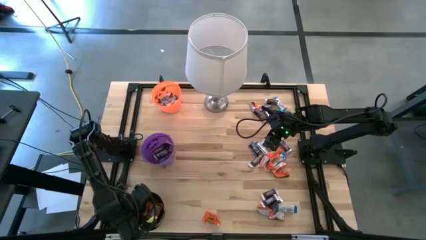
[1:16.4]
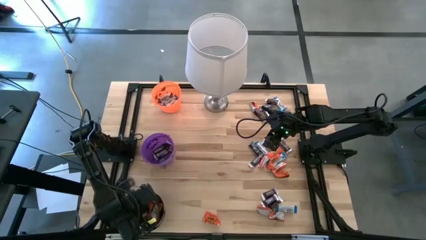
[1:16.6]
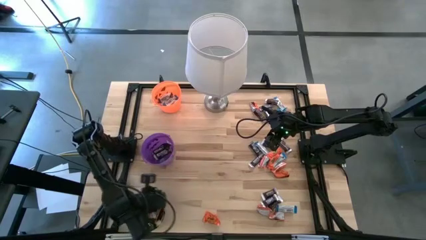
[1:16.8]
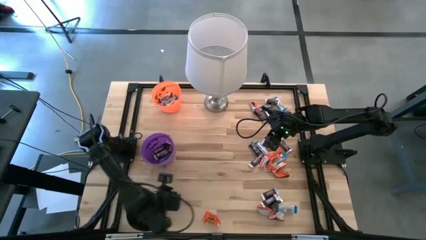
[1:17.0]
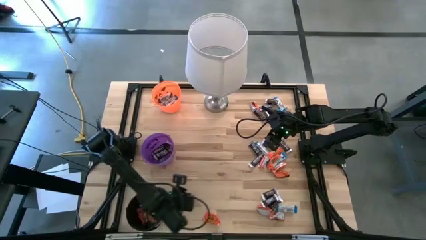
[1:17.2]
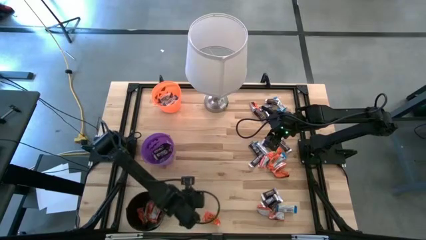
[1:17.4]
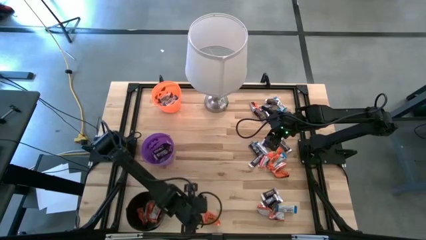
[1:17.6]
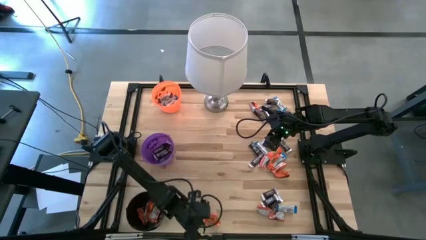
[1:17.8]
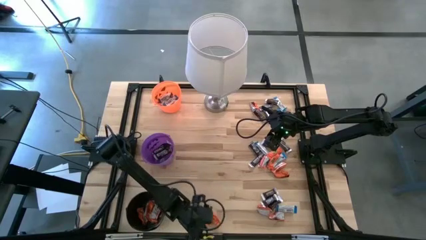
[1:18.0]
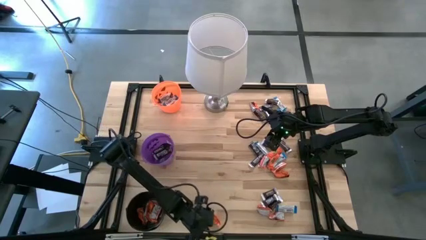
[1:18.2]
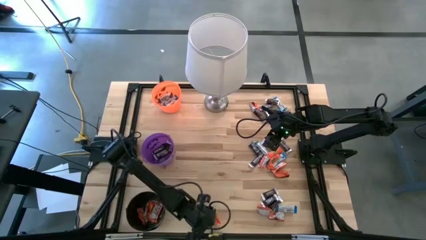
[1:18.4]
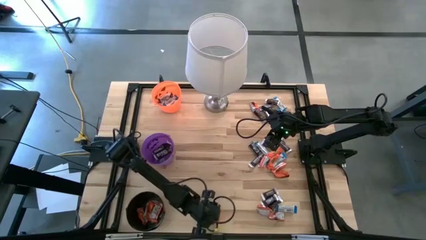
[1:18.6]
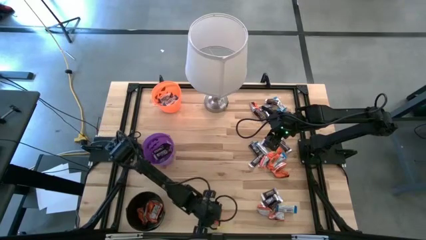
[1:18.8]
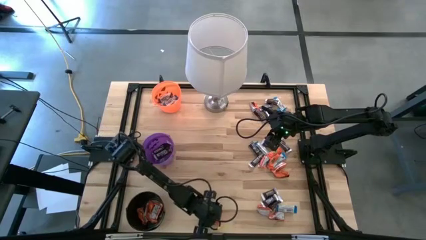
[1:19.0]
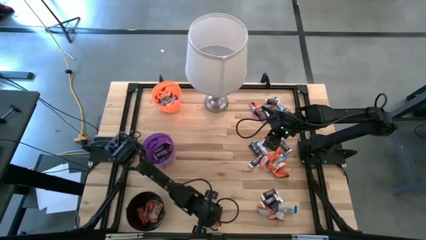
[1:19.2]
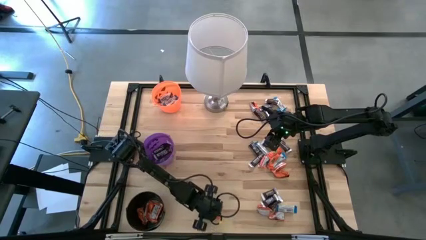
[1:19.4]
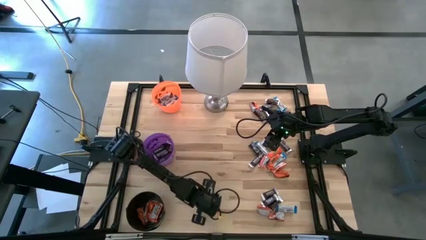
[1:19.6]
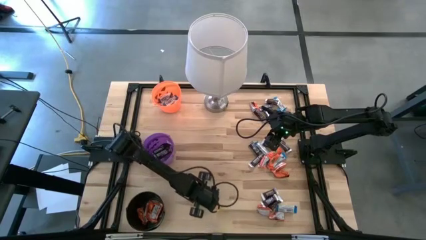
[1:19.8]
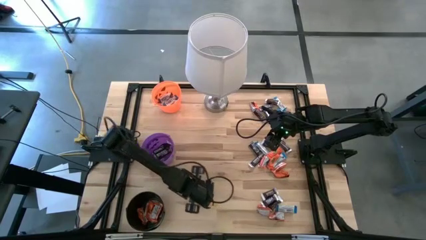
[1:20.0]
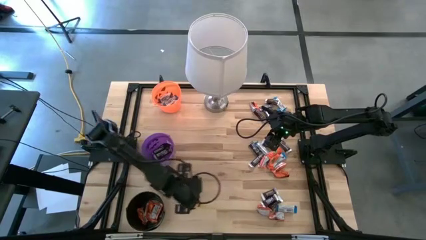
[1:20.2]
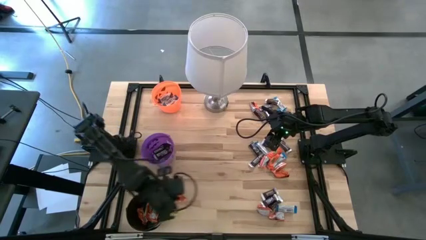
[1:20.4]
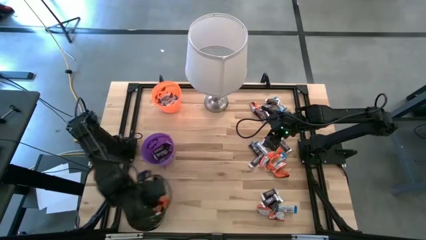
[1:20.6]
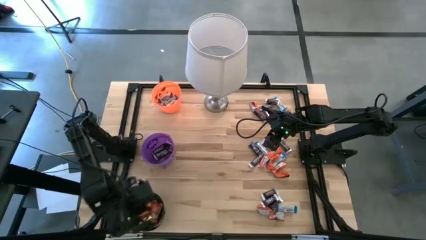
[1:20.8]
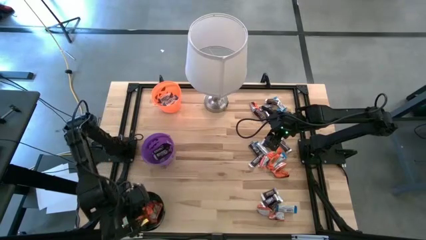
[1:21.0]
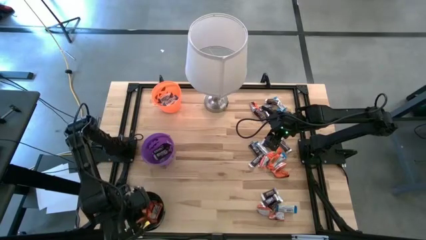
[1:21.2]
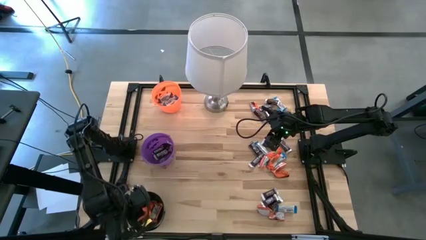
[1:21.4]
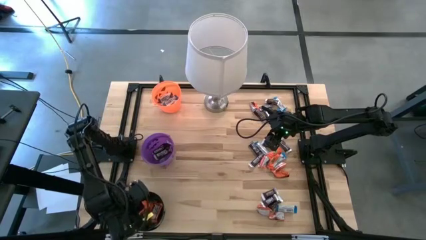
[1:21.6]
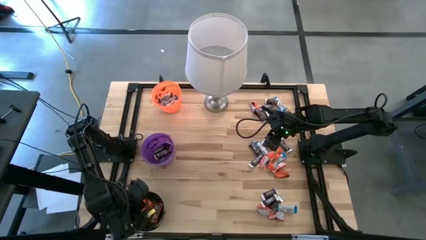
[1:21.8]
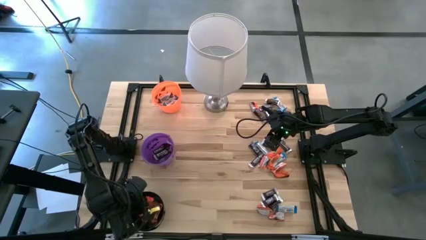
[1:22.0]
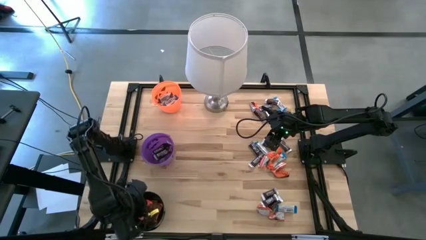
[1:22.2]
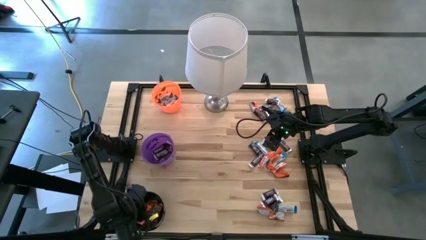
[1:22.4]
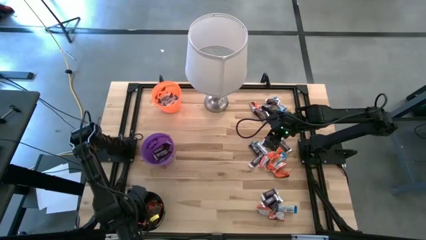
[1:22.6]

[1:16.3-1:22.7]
Task: Sort candy
Put the orange chocolate into the black bucket

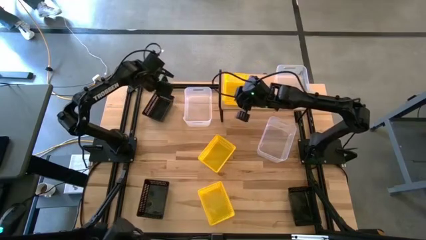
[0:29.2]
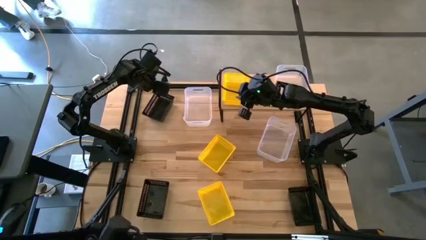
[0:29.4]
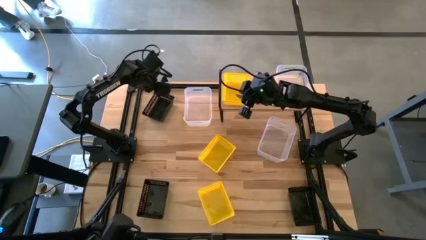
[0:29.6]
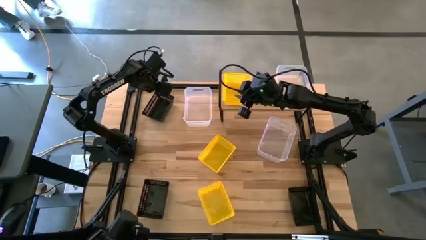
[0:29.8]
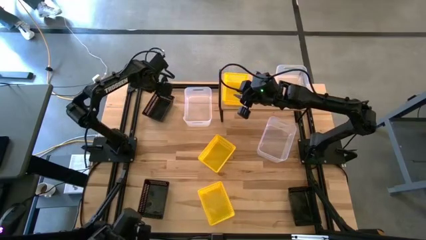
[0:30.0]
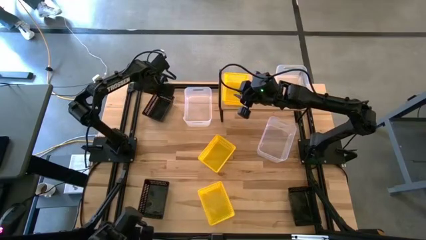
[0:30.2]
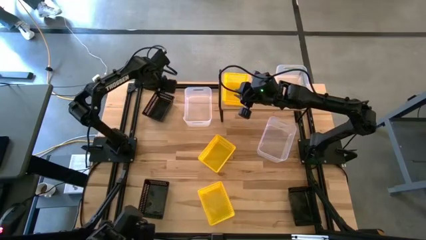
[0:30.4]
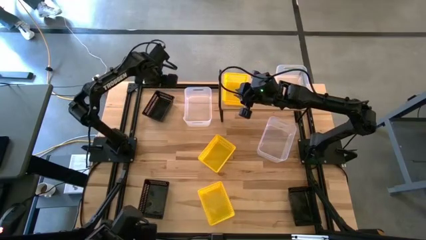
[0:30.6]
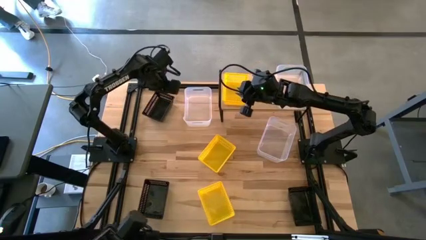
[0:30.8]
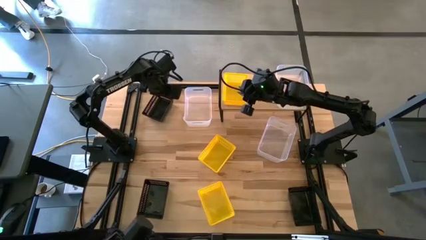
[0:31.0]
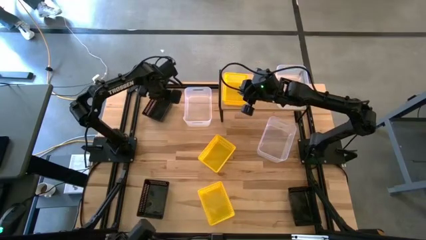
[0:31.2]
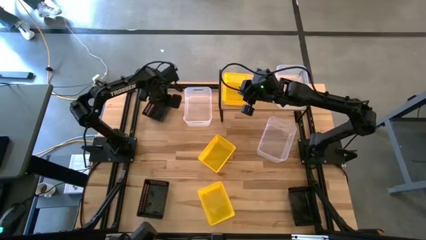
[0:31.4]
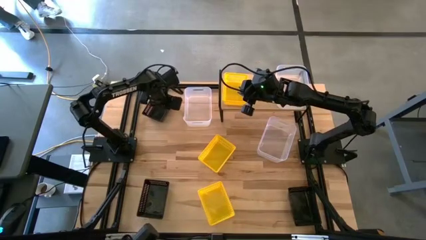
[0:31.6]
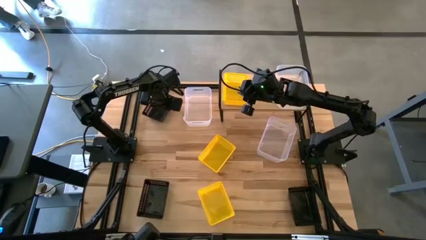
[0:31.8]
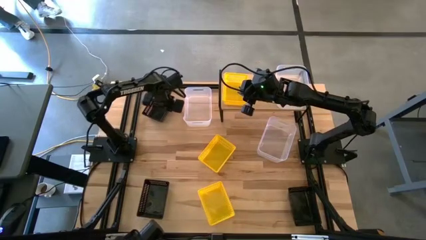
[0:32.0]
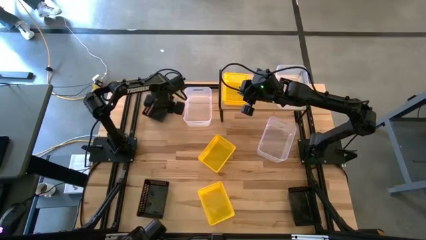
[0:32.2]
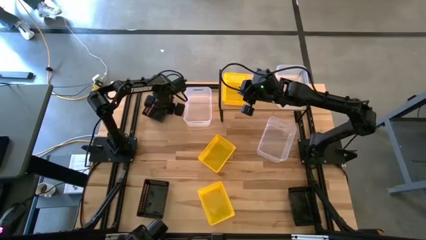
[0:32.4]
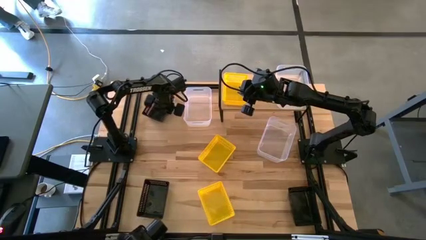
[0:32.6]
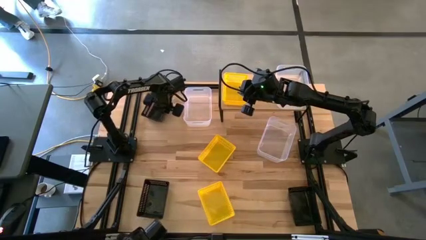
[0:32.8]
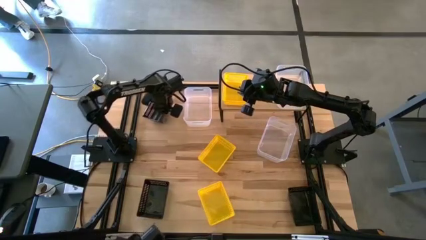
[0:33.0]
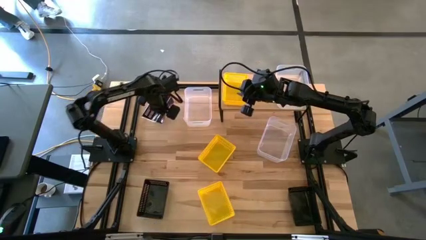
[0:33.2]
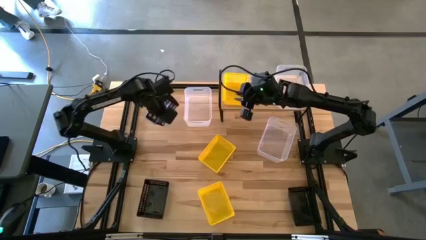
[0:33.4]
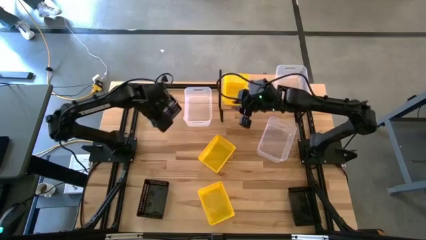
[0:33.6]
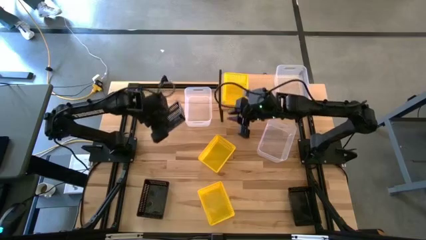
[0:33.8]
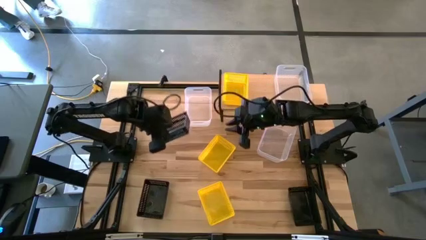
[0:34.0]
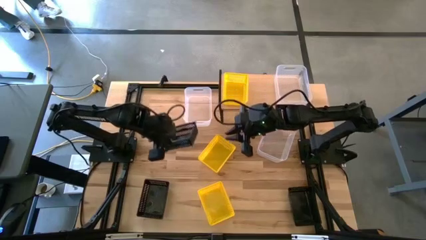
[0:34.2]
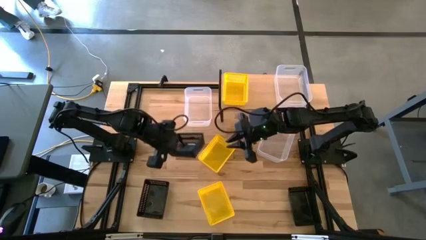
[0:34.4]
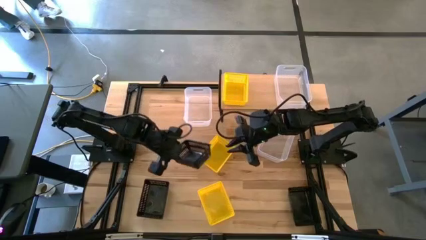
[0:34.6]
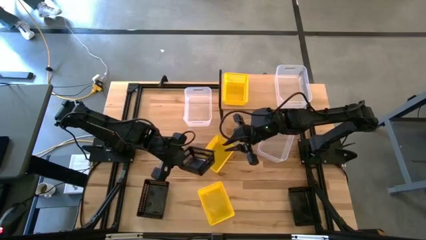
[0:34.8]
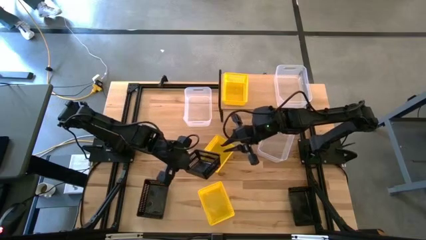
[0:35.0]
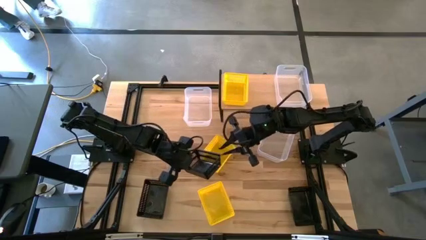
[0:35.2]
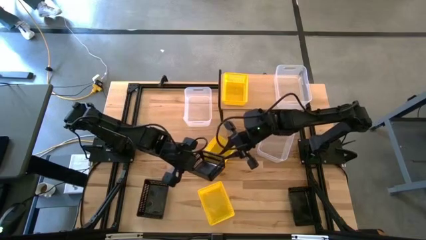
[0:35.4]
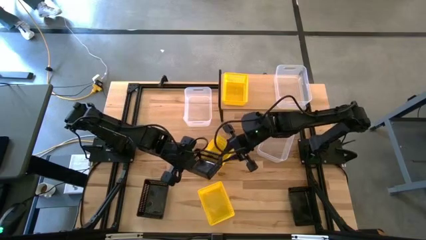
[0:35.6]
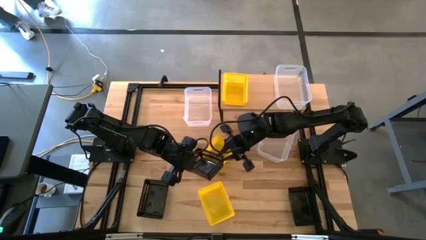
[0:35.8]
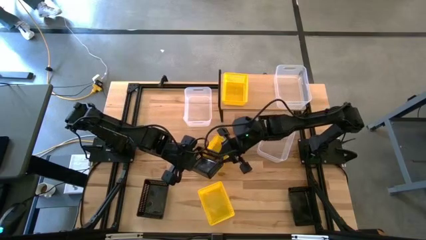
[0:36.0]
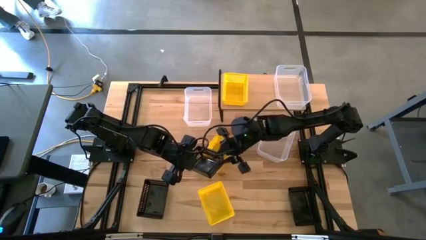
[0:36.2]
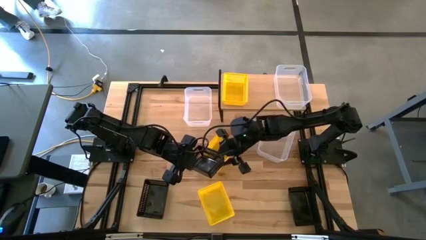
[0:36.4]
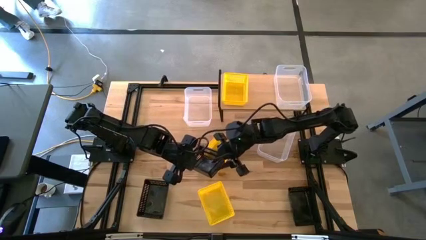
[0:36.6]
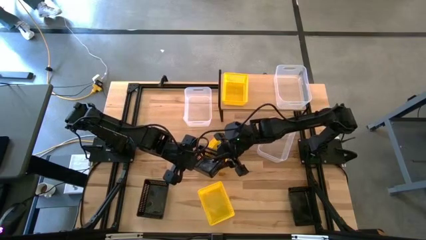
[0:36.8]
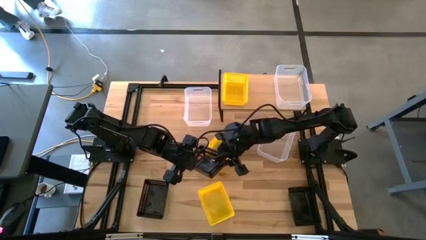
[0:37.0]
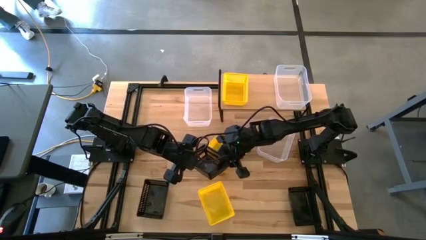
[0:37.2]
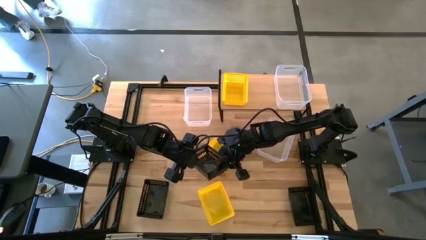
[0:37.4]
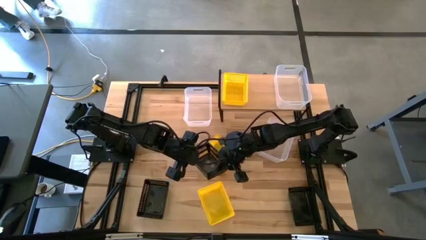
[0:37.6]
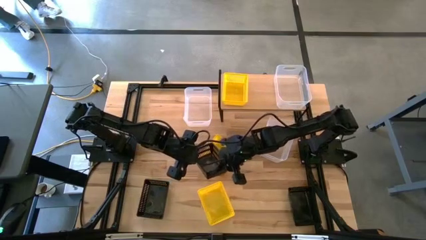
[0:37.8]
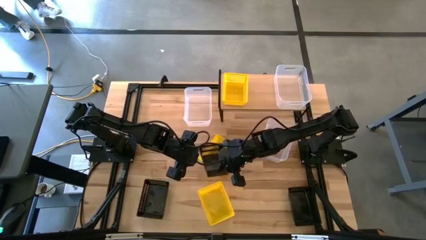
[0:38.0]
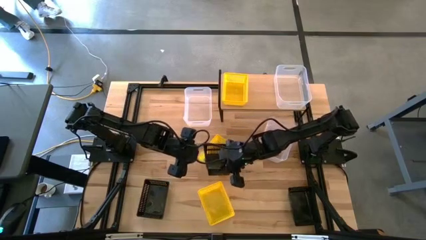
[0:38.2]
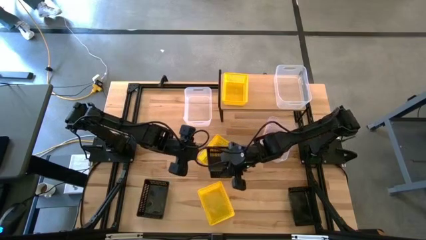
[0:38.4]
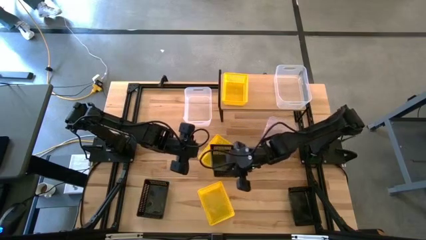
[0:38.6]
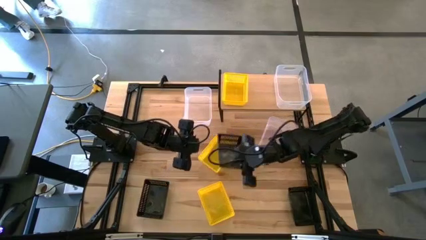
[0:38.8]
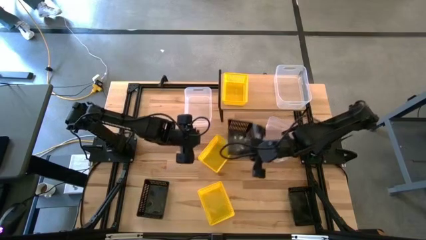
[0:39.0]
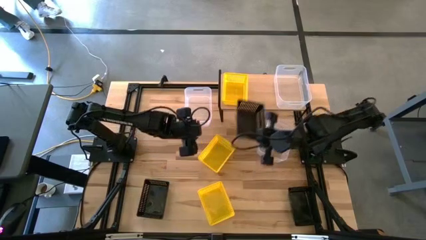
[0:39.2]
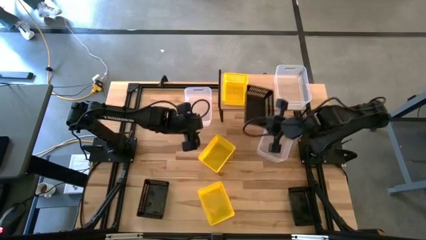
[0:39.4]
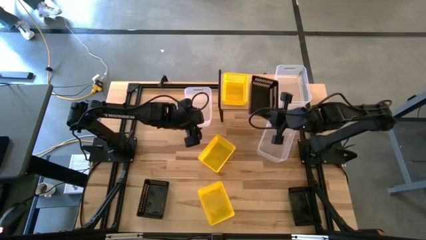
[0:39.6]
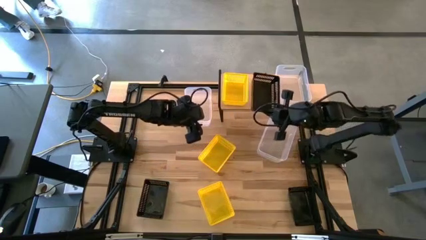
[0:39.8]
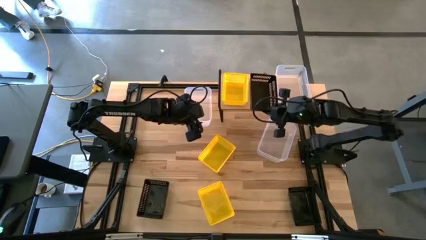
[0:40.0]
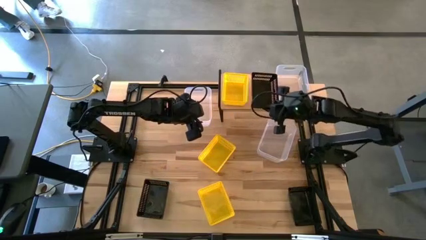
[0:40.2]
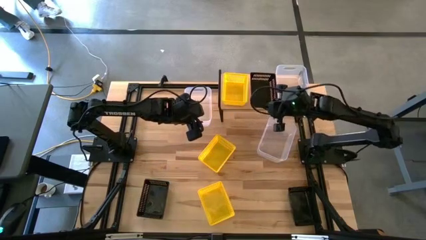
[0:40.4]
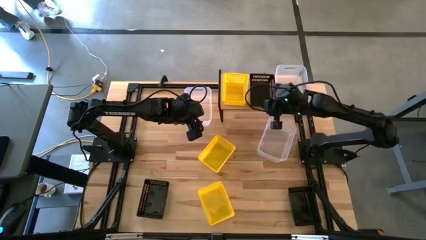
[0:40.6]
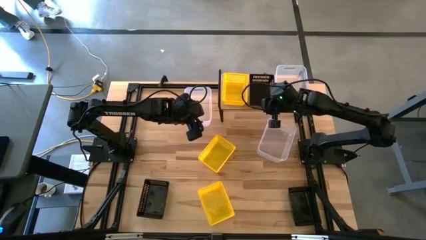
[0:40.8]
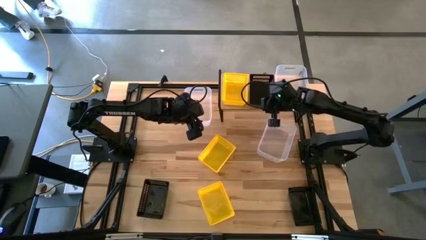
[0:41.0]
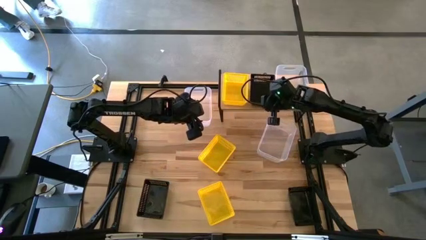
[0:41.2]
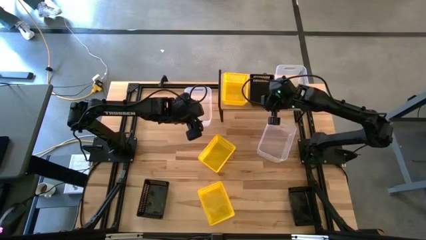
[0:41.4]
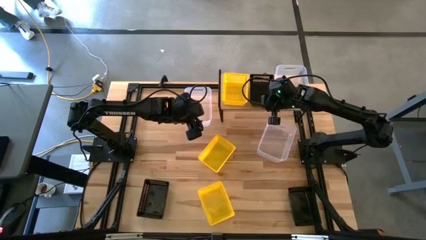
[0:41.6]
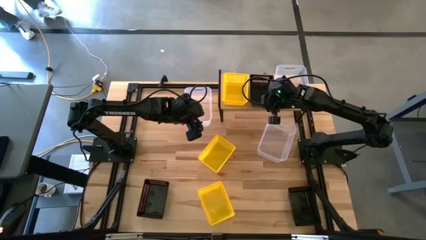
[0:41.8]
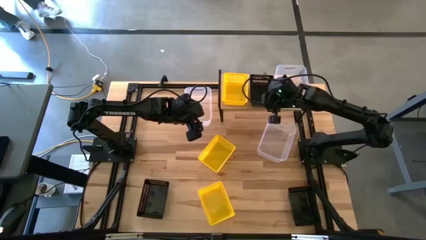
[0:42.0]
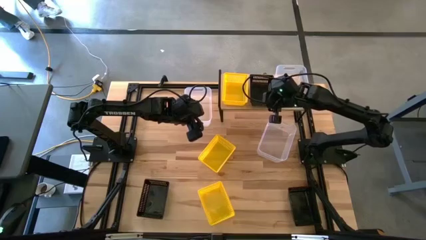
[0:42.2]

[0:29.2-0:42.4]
Task: Stack baskets on shelf by color
Put the top black bin on the shelf
